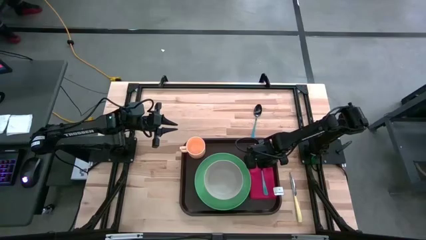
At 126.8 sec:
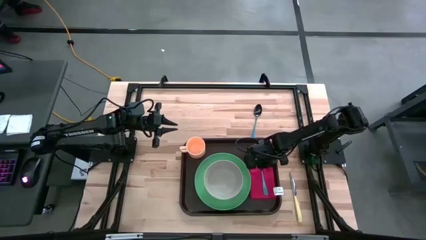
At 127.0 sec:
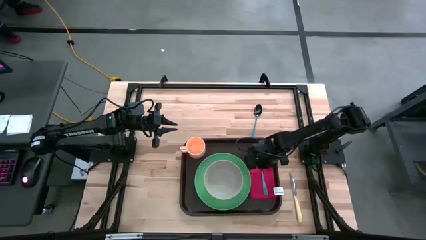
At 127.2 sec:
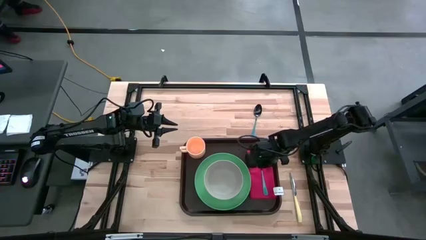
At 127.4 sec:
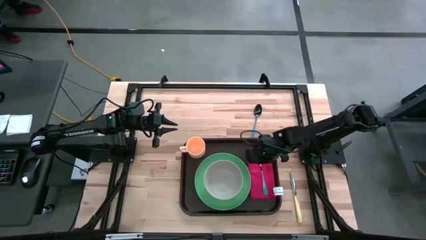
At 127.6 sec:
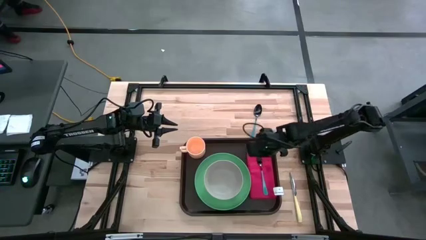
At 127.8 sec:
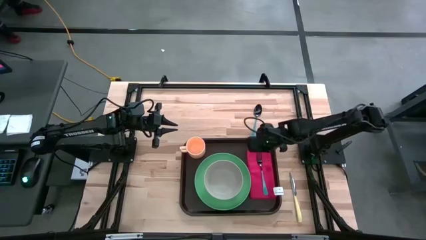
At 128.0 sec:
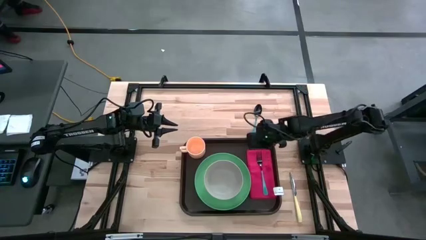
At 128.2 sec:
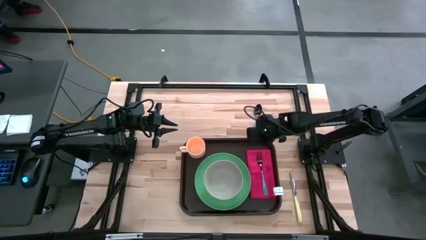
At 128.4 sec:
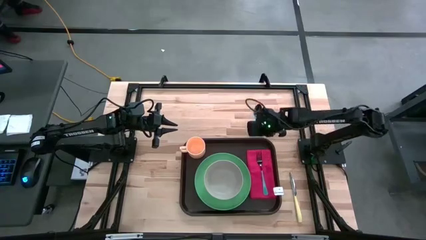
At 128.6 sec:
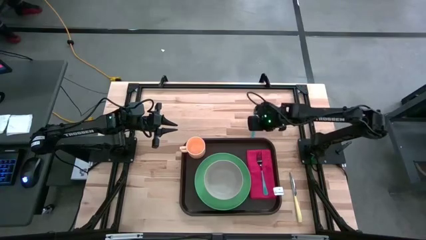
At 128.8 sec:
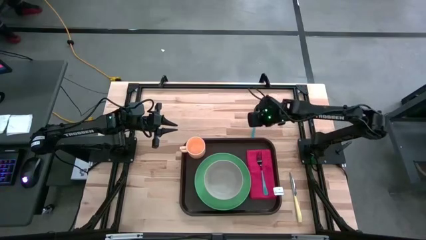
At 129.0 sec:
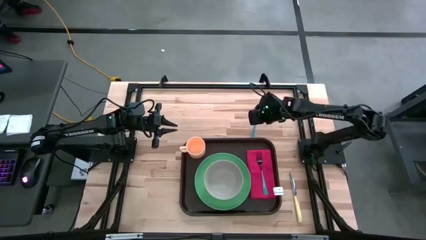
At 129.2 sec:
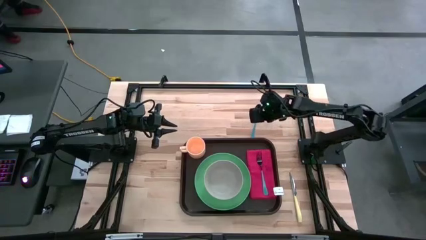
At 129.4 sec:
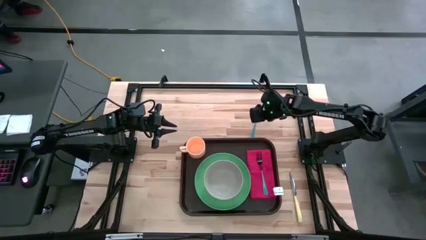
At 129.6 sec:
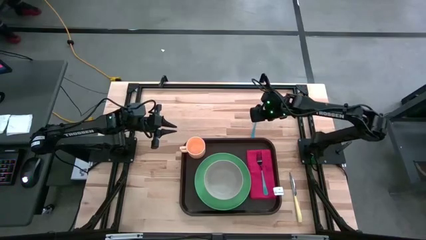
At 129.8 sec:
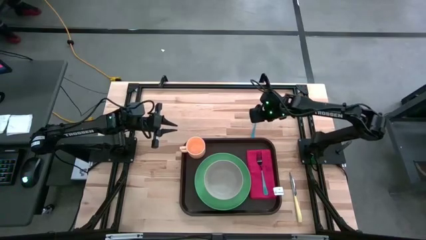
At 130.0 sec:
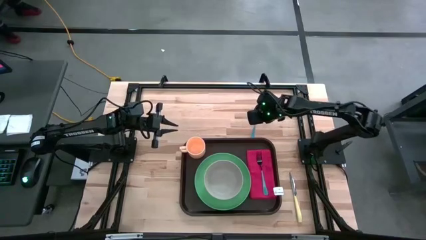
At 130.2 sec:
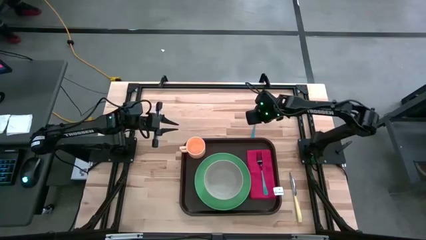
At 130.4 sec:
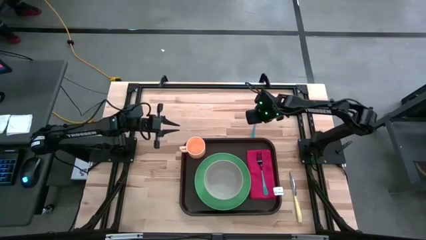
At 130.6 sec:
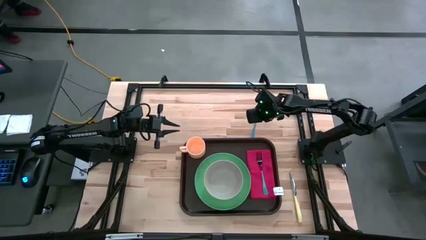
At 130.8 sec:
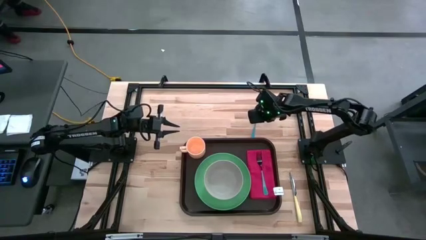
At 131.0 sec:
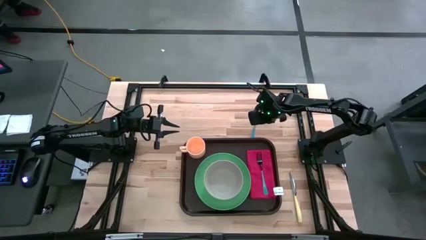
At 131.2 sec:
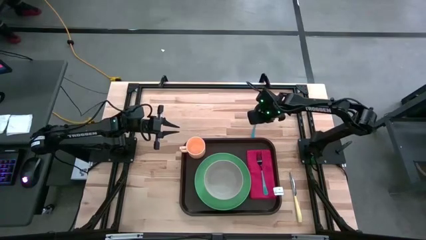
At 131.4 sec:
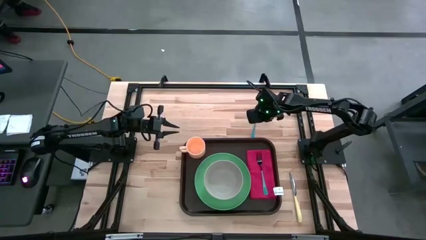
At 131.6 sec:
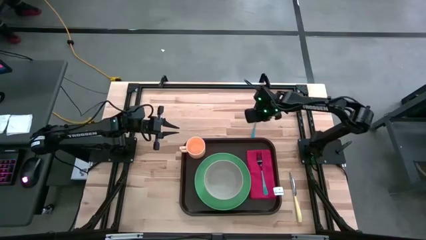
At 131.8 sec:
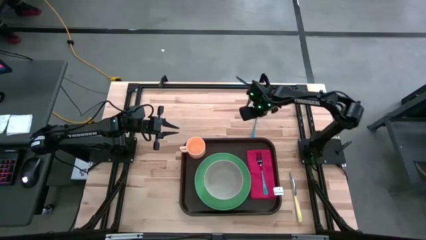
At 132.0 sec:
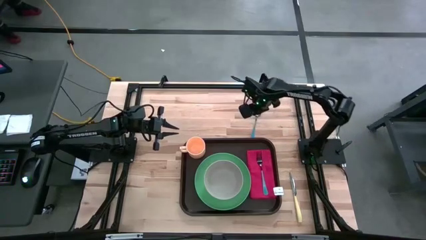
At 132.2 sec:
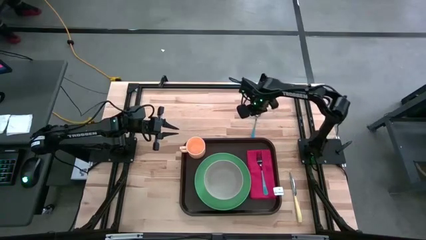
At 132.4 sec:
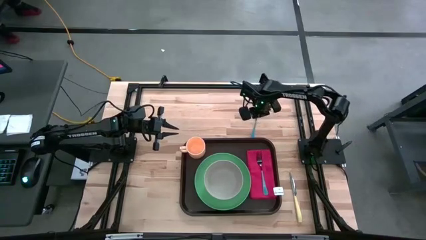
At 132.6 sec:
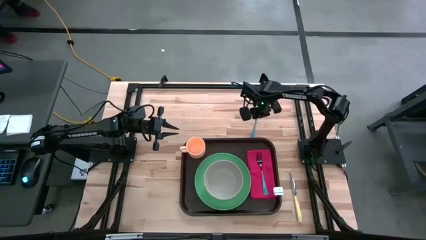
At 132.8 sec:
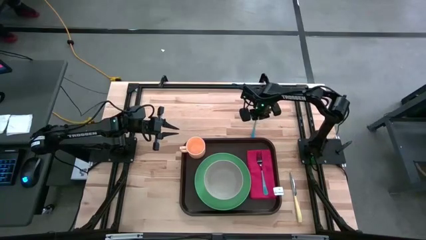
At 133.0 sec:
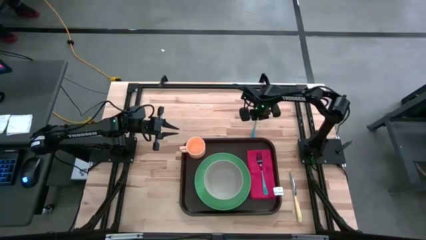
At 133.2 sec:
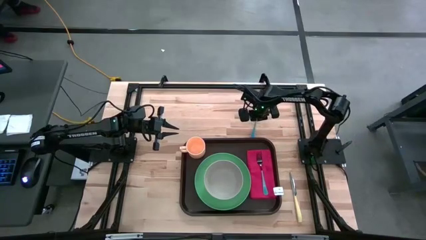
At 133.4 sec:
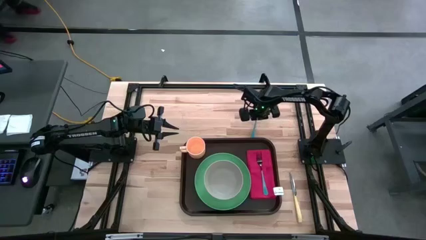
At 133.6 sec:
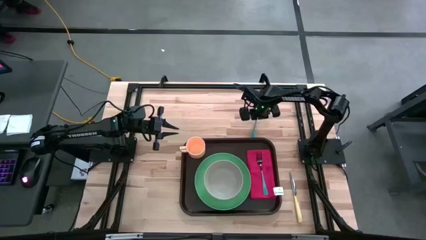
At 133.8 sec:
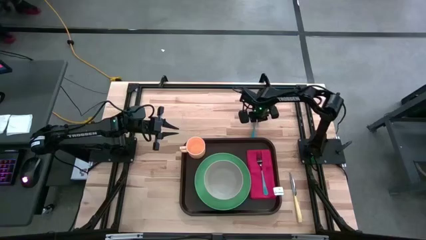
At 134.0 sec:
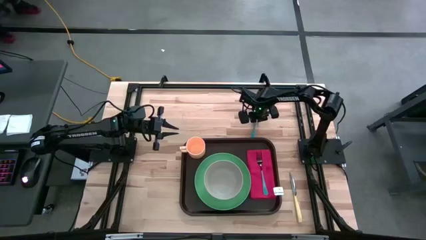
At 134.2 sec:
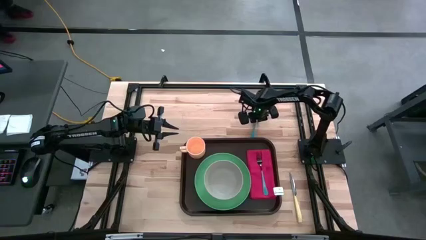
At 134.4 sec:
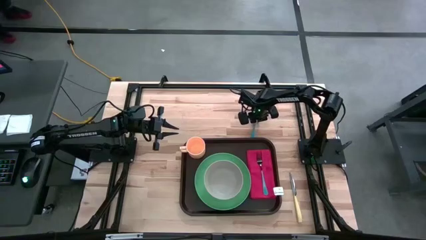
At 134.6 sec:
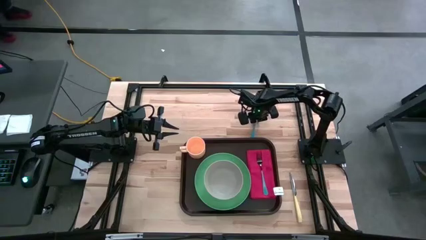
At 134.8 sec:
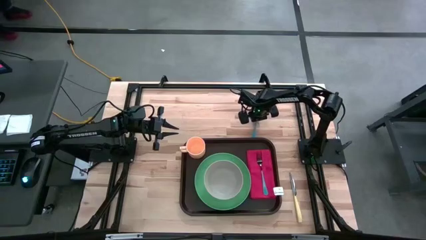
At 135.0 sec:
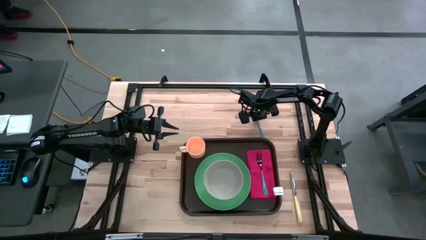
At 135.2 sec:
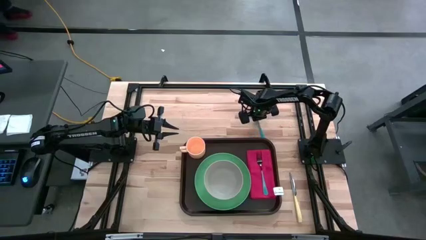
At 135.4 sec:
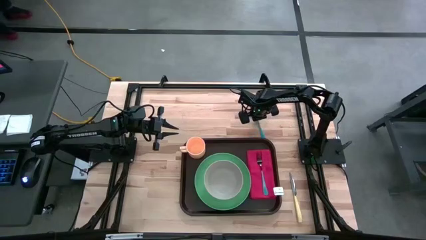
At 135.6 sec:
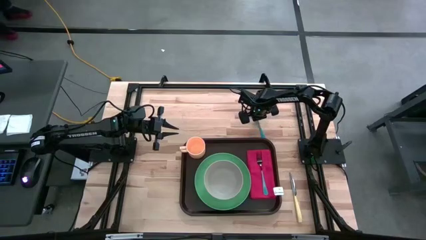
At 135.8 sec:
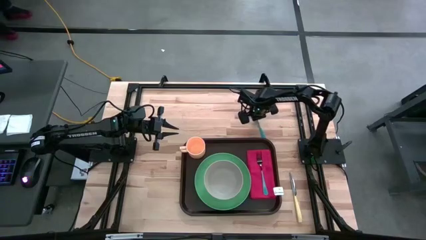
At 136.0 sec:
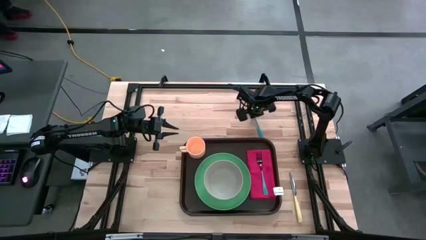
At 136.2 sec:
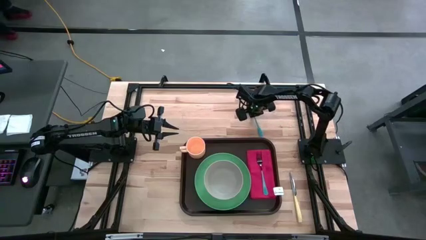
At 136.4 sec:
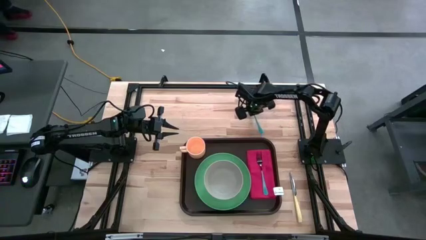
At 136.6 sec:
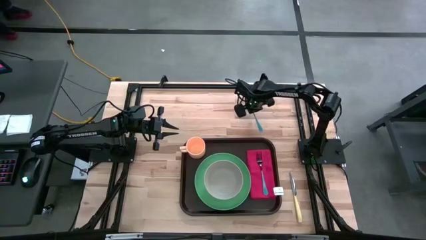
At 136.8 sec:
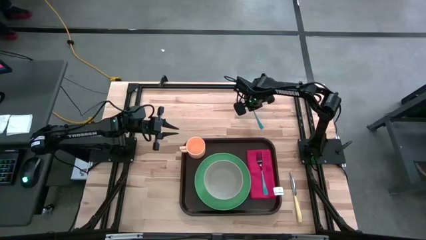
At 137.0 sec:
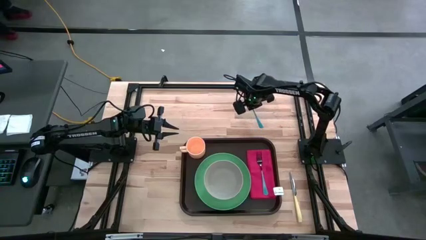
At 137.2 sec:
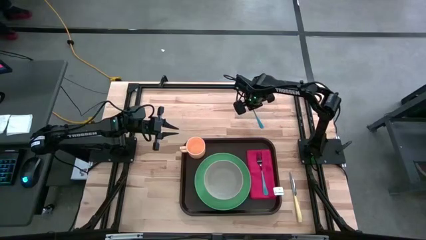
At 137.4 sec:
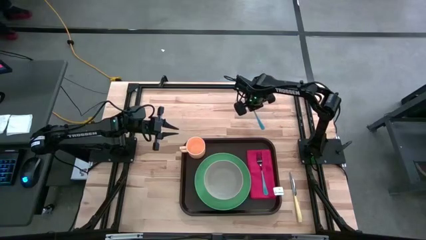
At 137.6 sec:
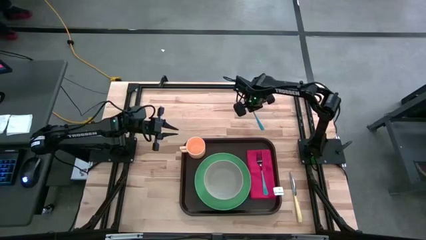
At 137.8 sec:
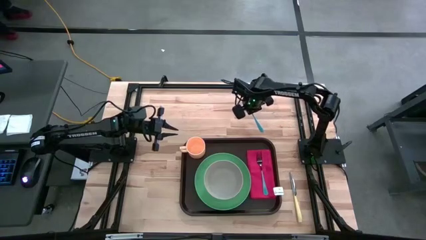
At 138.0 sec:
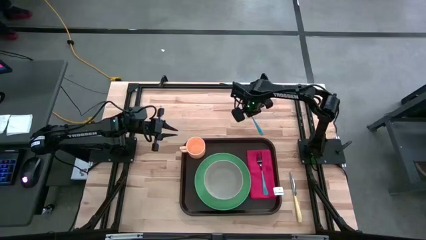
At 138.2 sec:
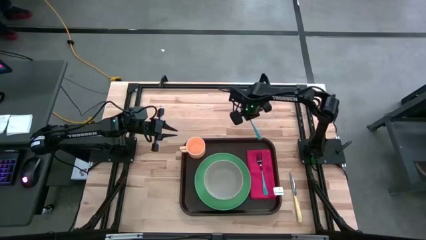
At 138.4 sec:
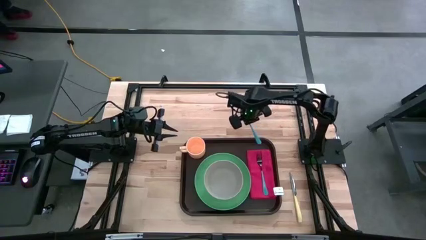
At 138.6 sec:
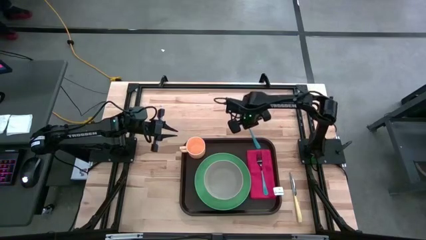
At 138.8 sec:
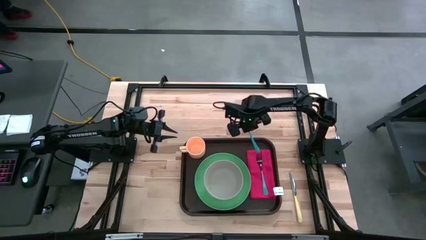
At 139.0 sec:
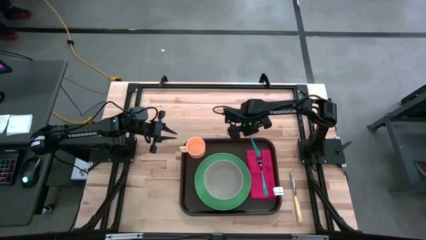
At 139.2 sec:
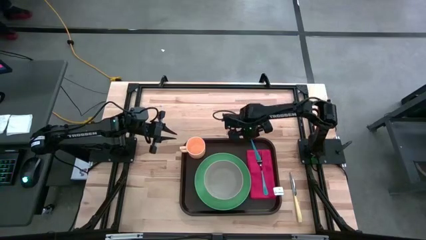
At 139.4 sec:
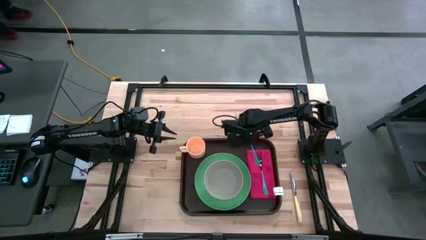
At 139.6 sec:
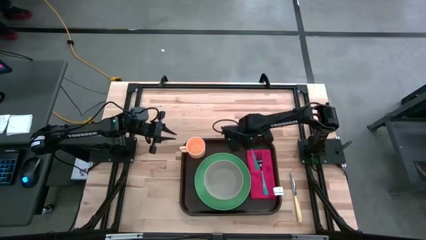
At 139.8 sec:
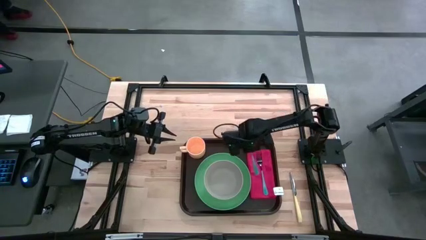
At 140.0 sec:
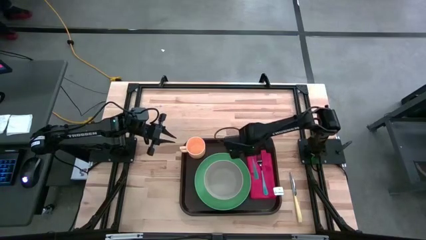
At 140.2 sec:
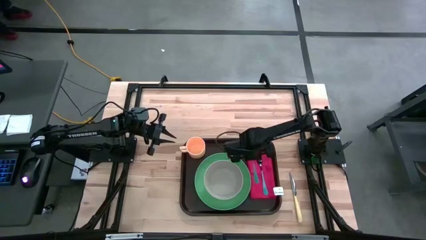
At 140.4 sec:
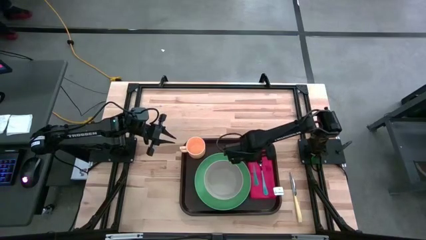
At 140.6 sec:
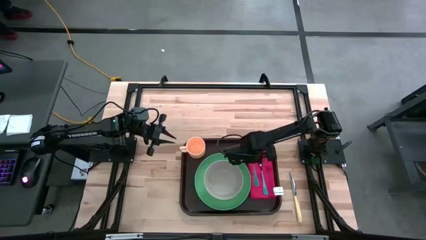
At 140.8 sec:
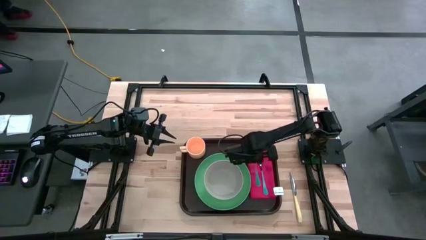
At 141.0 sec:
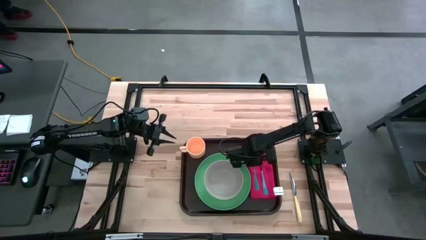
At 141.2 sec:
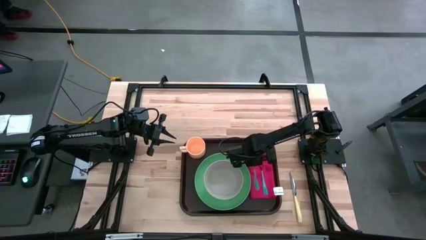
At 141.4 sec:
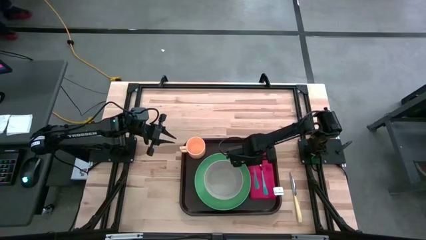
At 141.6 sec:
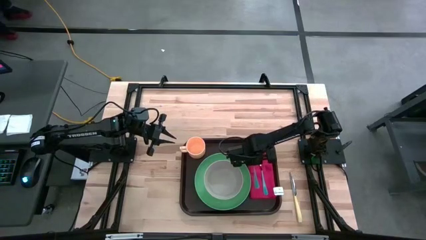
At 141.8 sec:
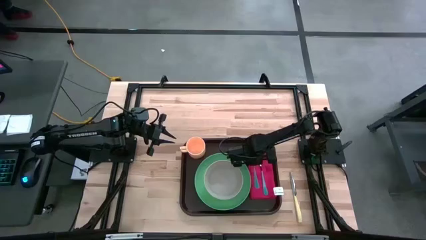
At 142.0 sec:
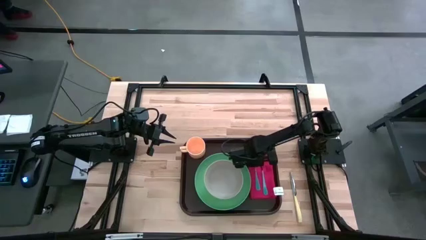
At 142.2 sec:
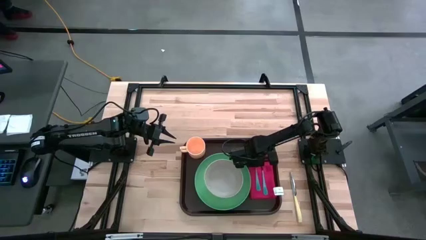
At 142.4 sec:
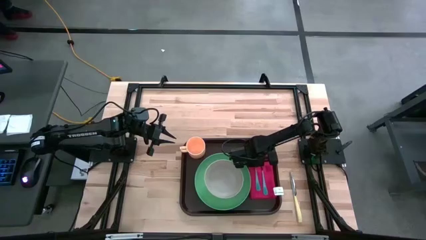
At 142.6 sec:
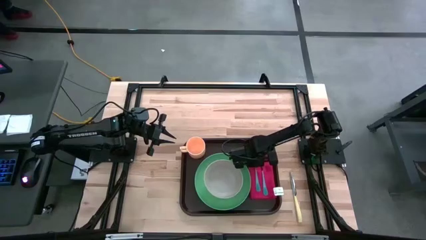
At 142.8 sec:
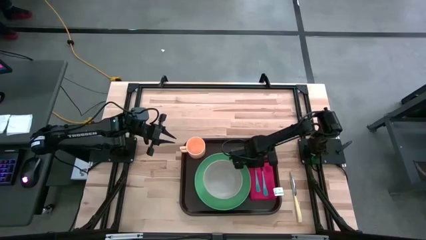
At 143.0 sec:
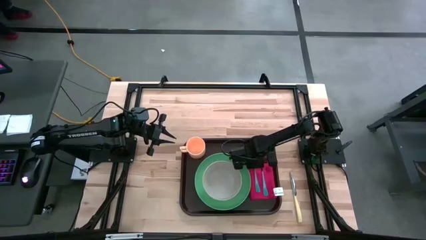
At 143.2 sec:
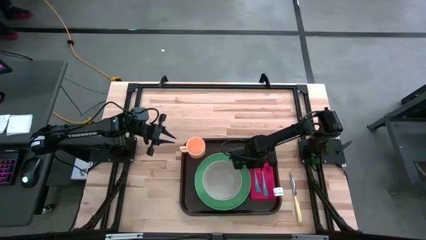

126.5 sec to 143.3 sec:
Task: Set up tray
Put the blue spoon on the left of the blue fork on the brown serving tray
